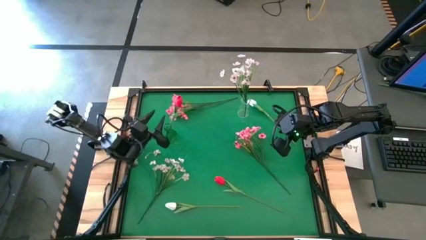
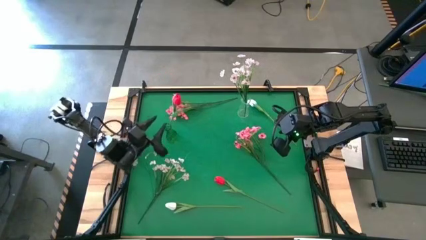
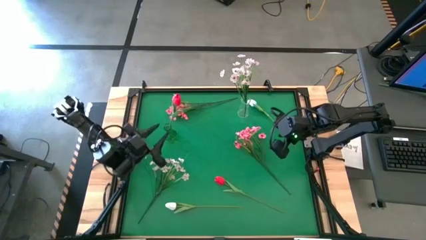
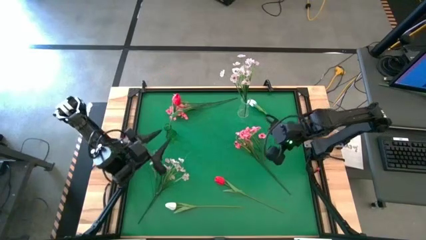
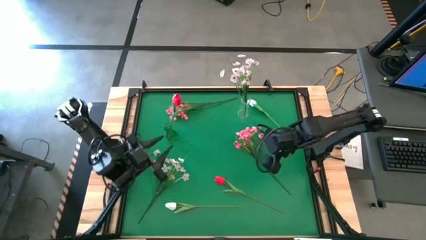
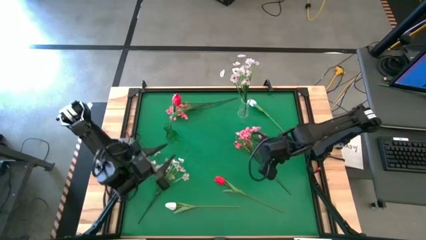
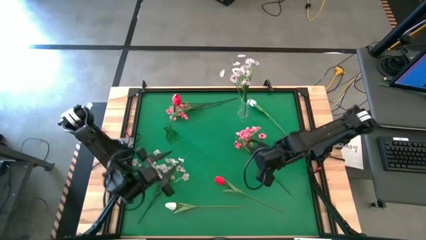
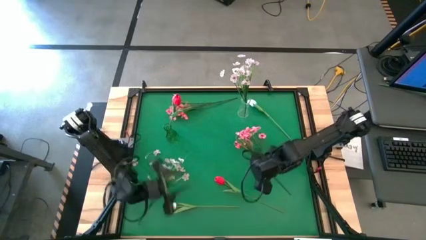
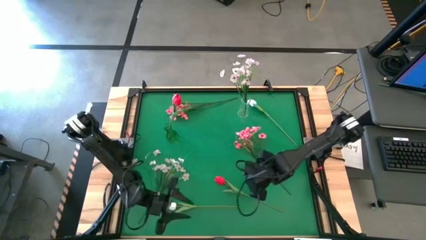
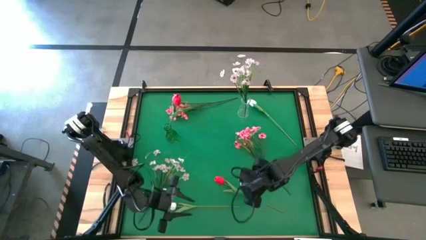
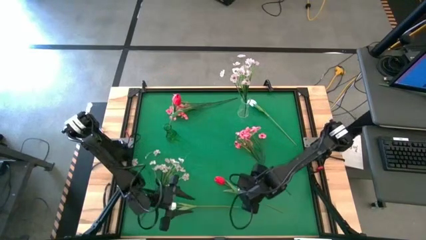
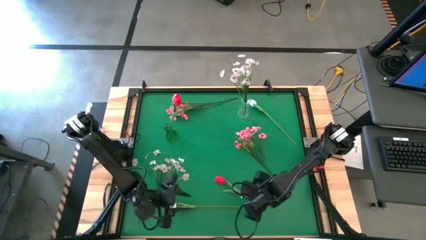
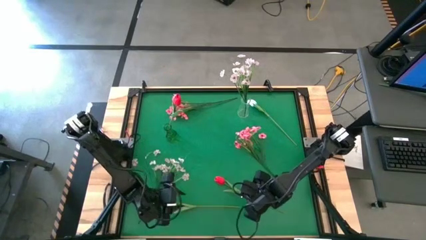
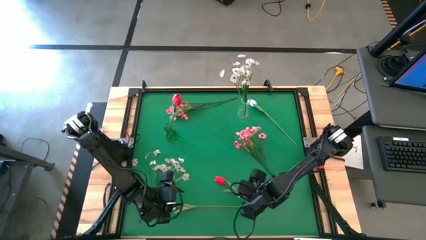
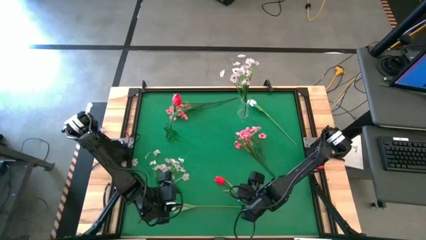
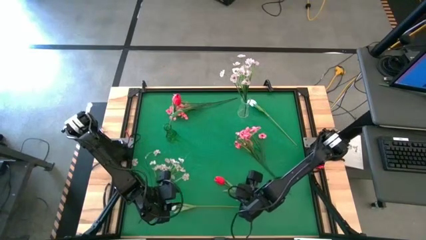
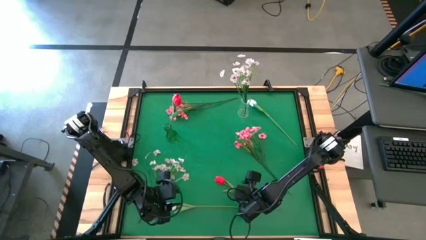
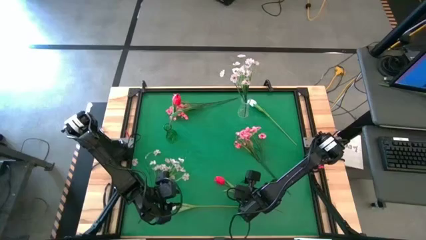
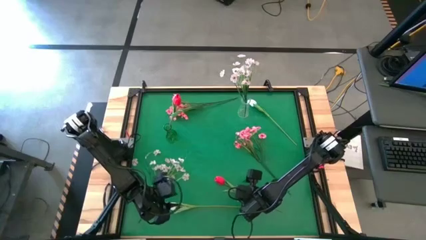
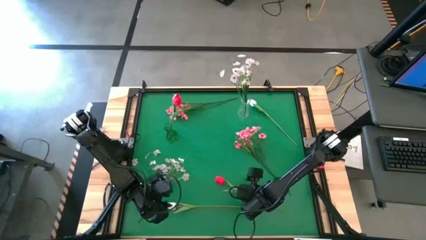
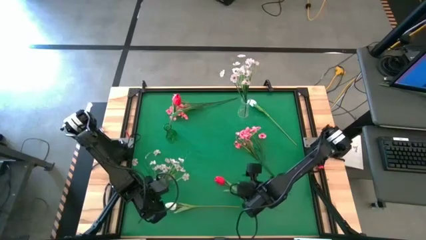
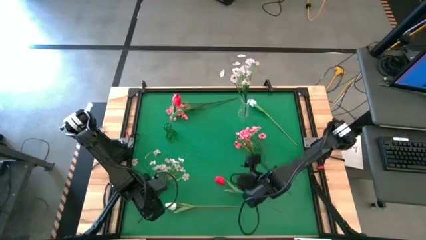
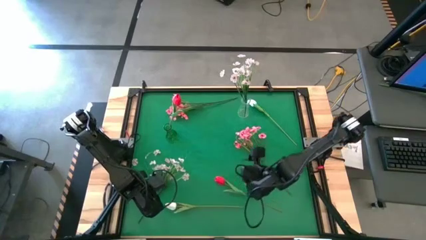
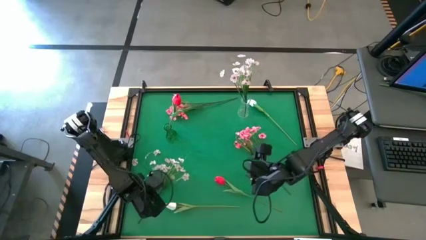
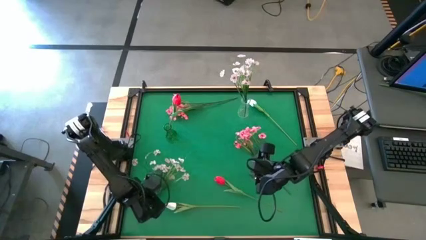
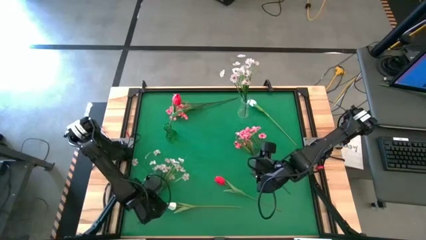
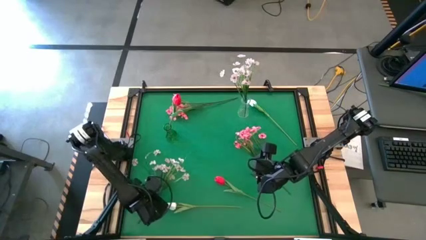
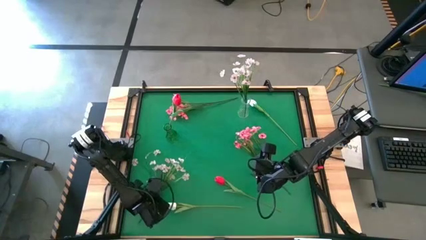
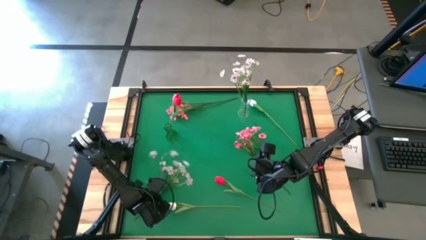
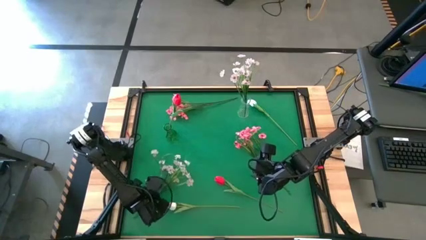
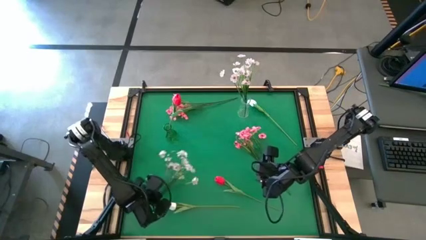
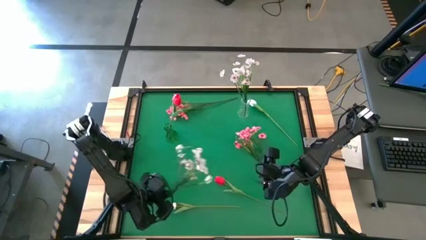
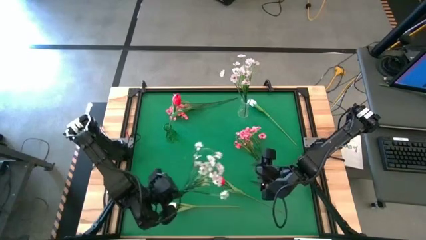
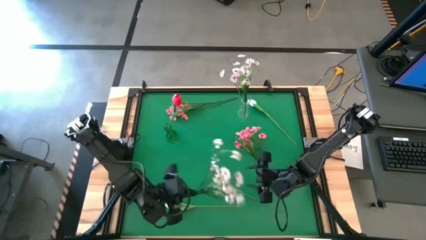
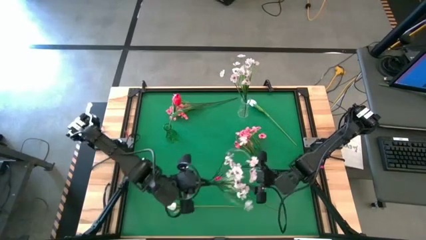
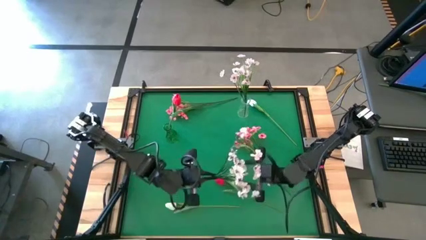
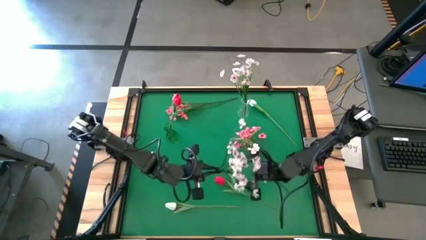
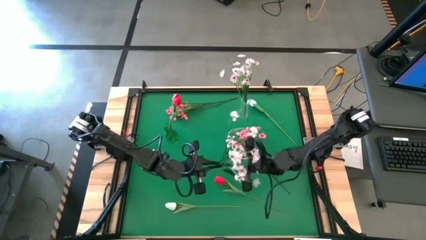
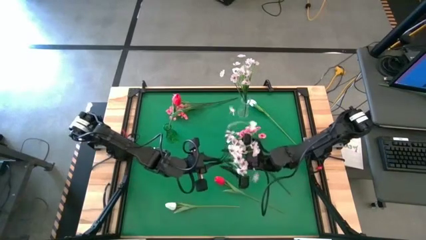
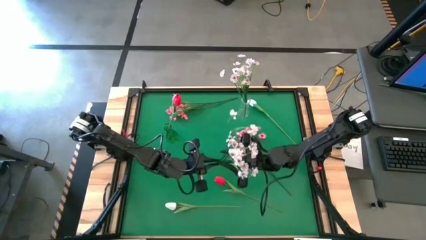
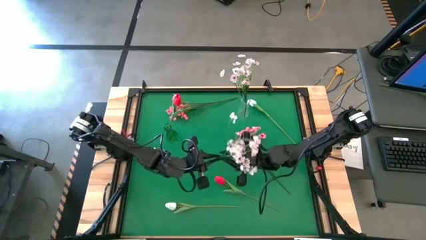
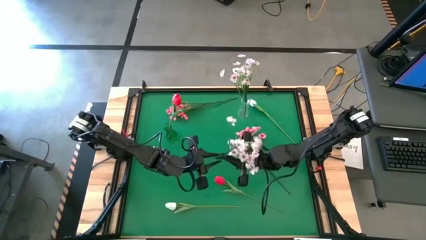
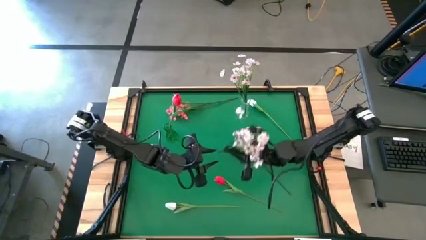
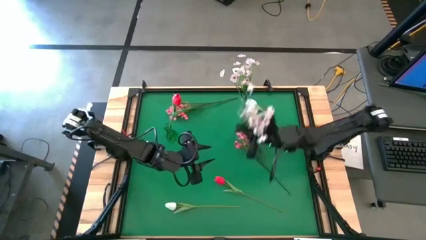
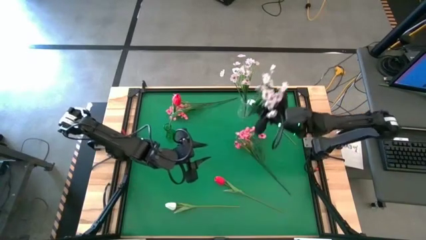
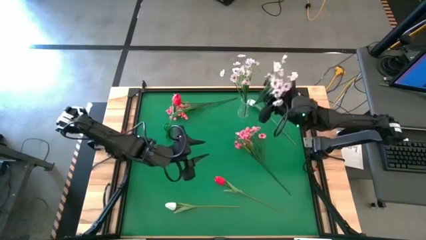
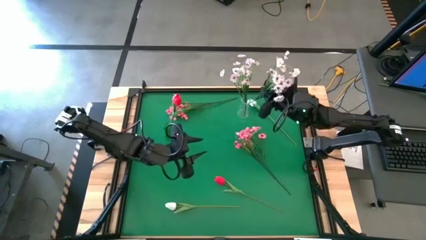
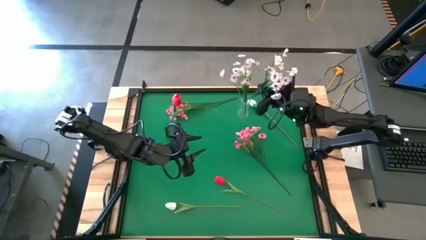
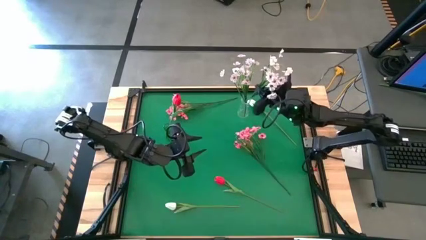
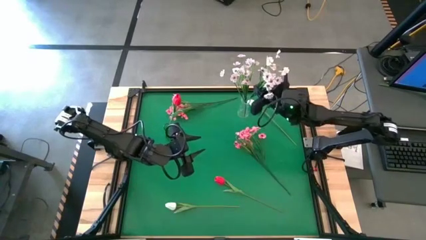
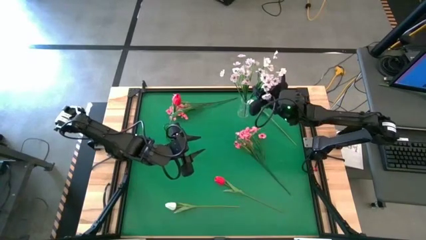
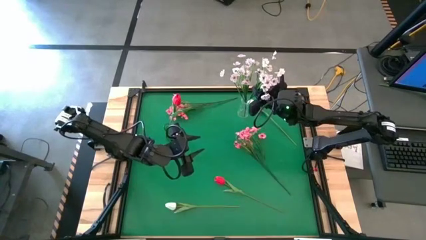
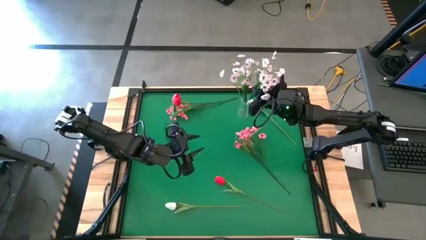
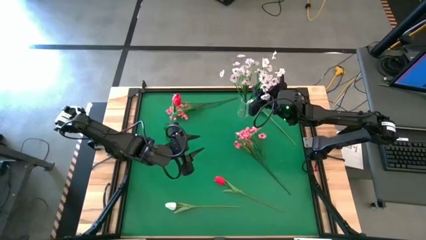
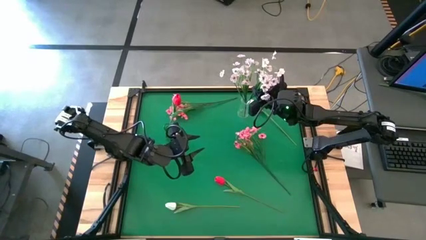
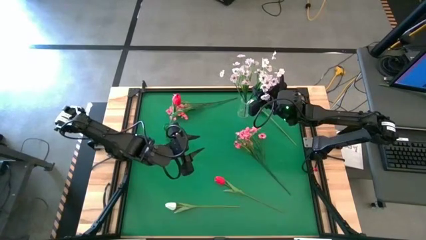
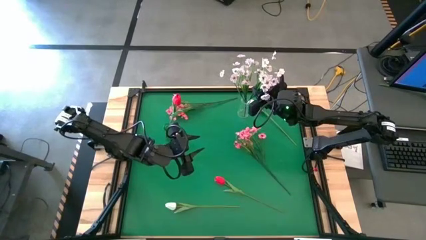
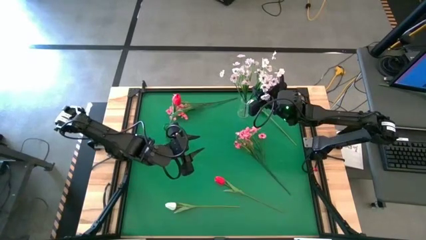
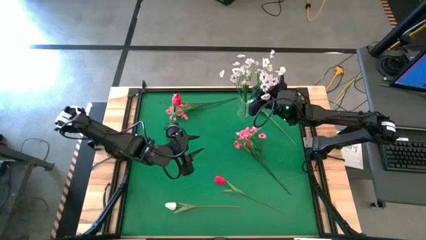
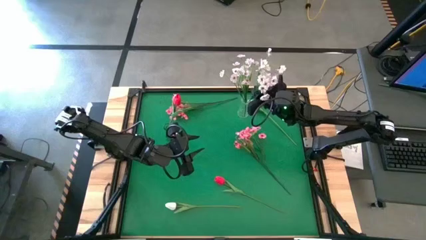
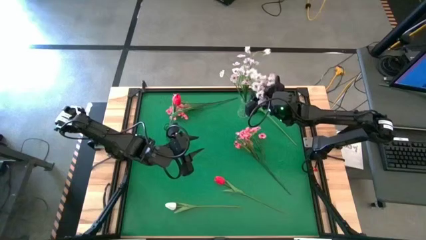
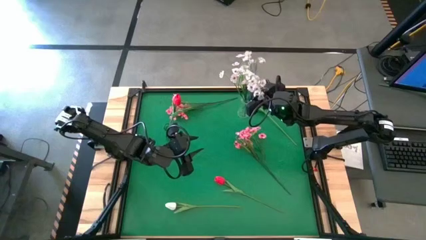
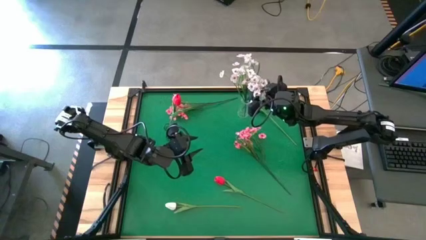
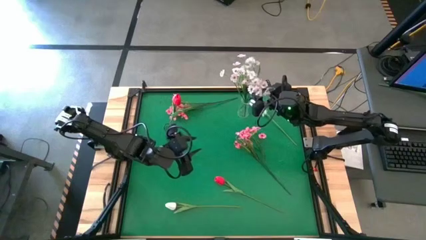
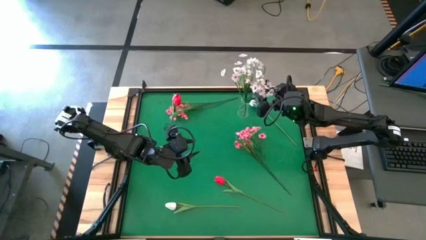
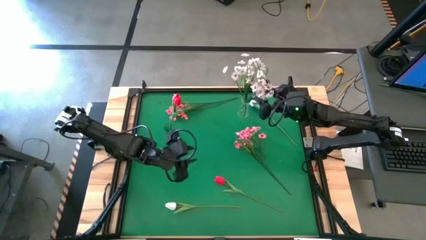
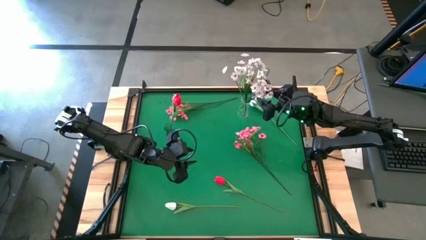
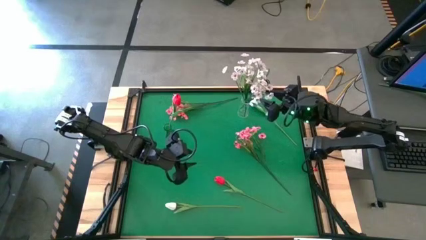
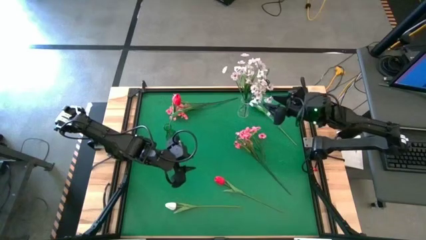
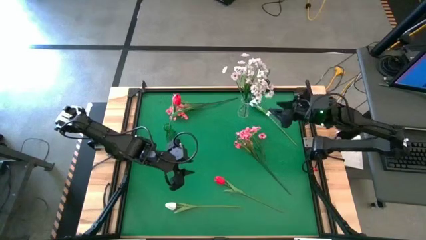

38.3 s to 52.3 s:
Task: Sort flowers into vase by color
Put the white flowers into the transparent vase
